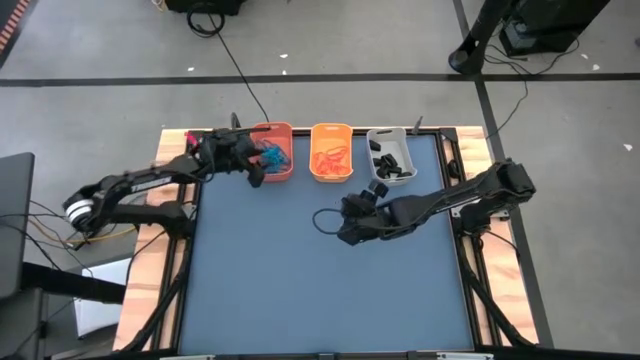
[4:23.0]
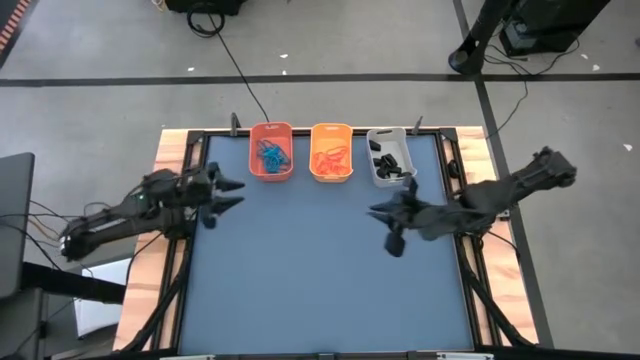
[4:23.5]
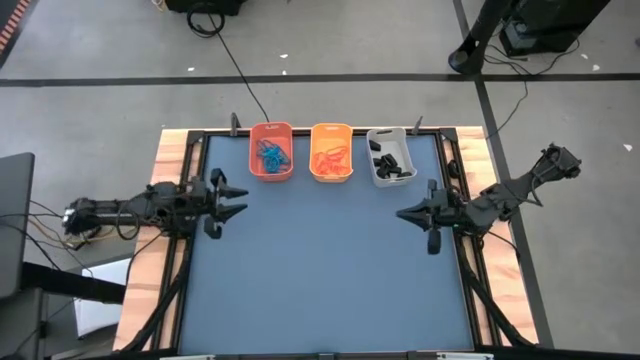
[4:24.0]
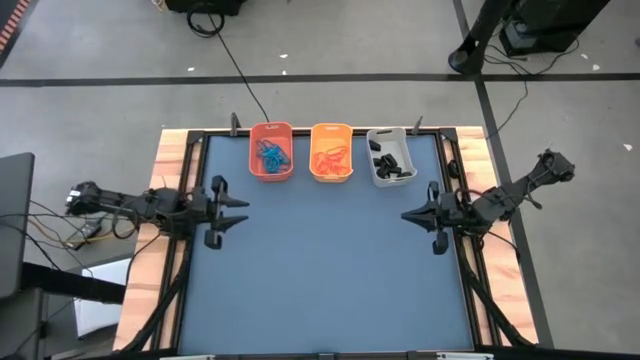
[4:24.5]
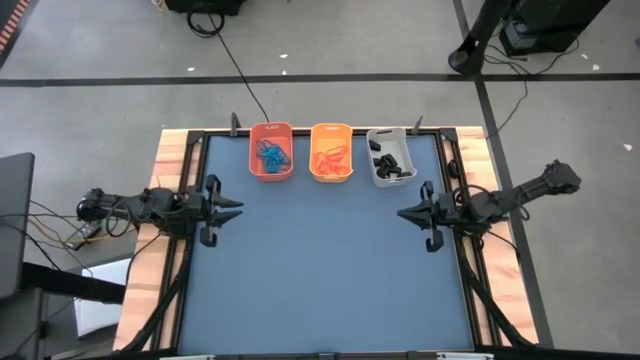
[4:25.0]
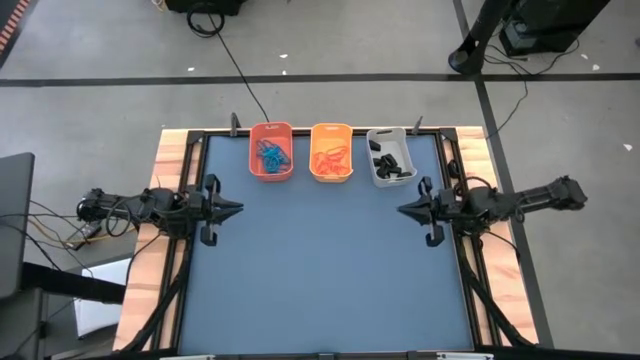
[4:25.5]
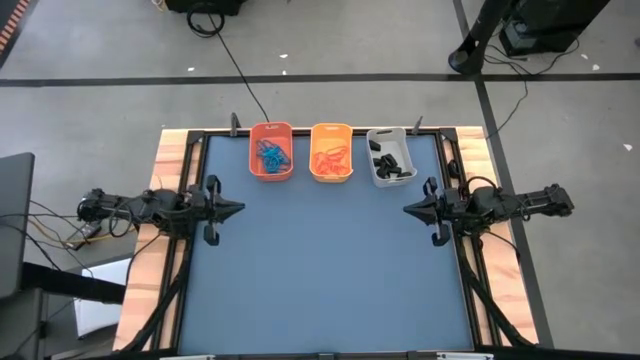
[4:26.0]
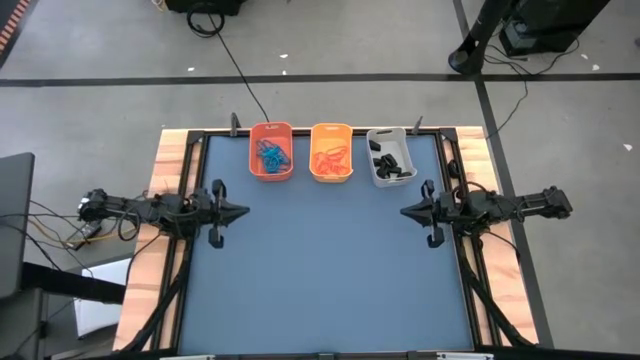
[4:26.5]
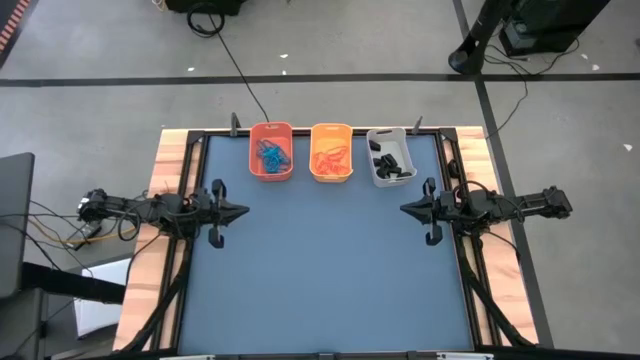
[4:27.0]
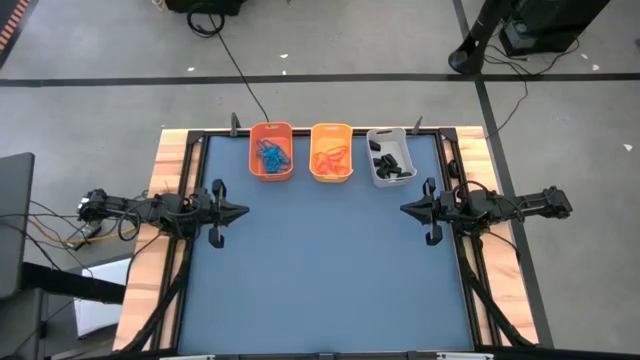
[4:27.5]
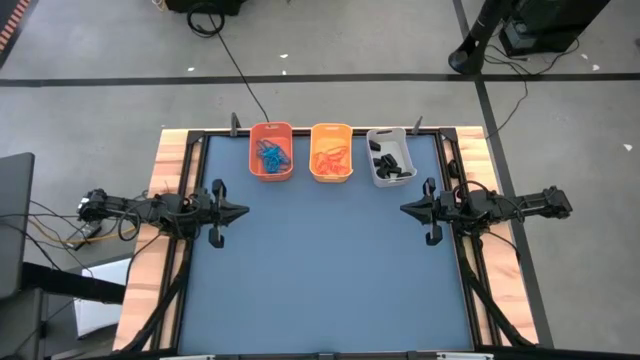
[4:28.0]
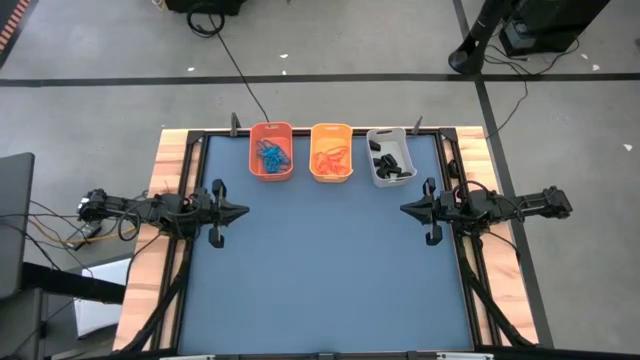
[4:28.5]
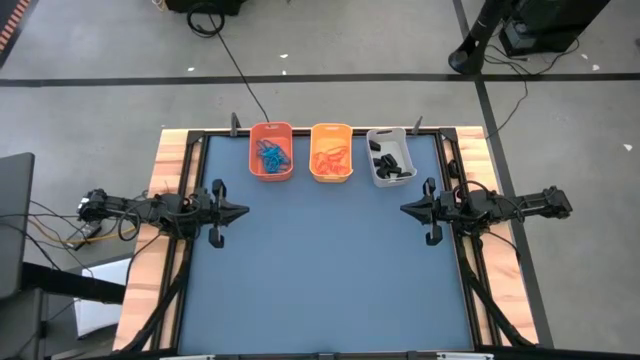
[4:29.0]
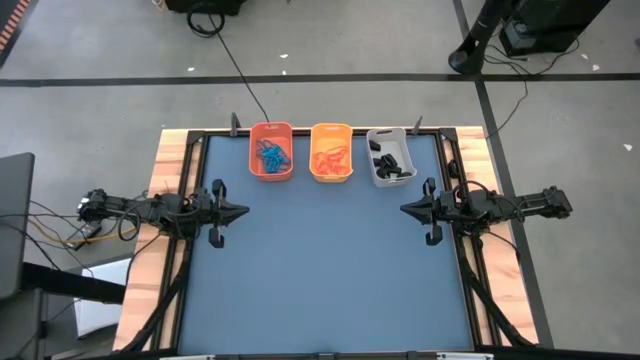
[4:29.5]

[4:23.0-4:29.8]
Task: Sort rubber bands into baskets
Return to Home Position

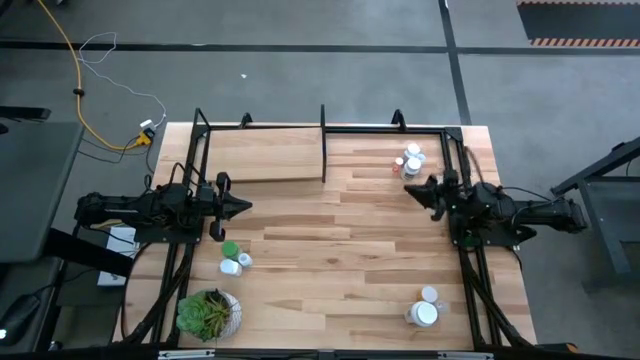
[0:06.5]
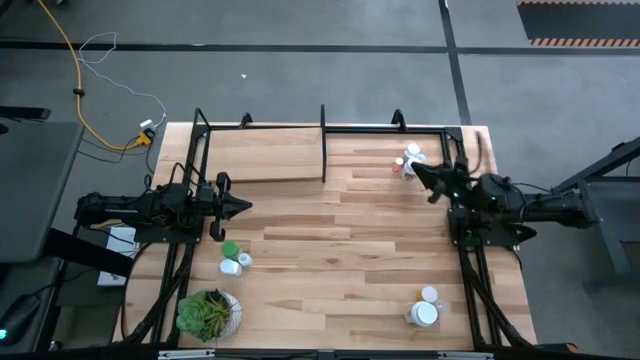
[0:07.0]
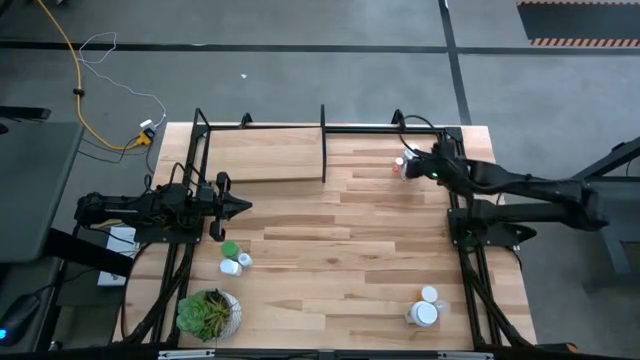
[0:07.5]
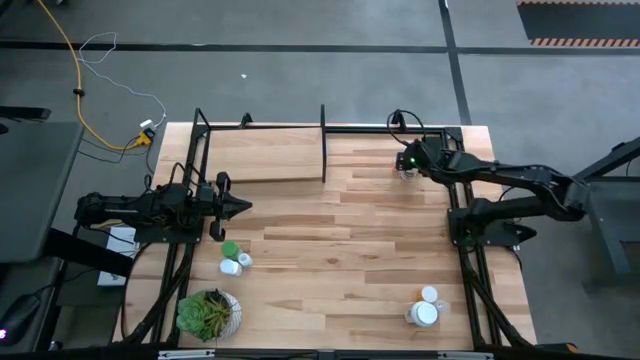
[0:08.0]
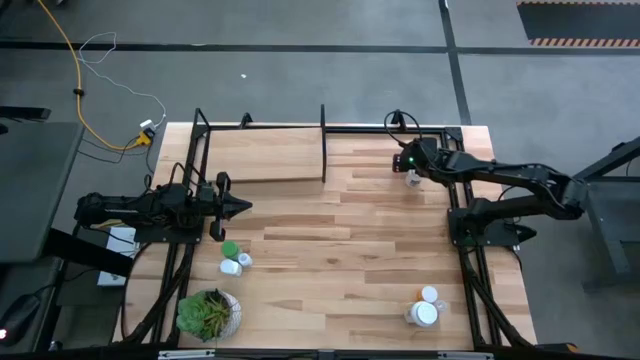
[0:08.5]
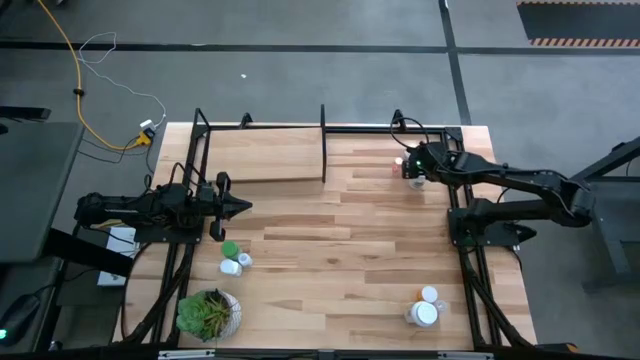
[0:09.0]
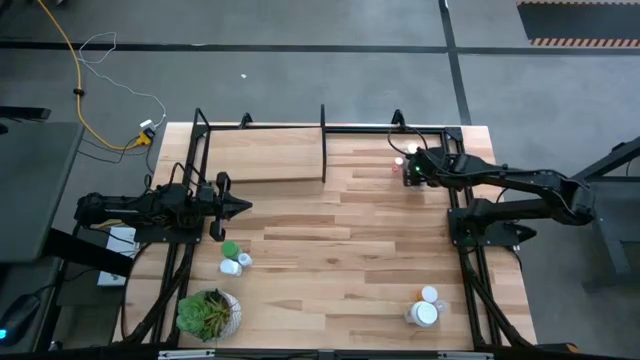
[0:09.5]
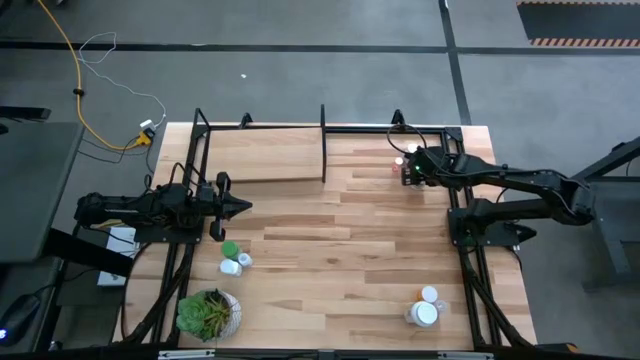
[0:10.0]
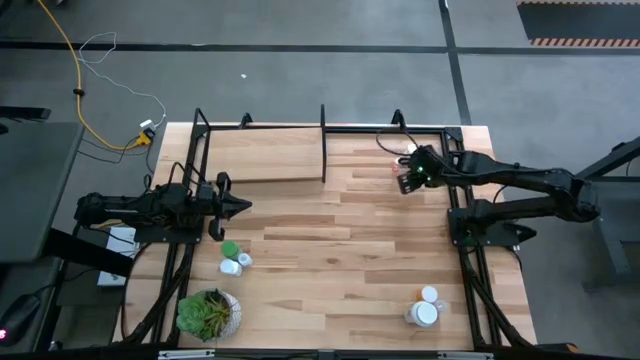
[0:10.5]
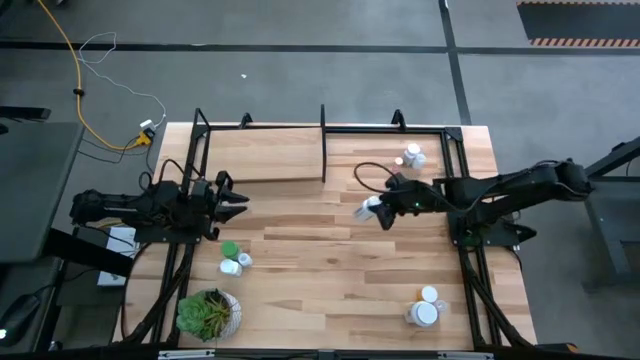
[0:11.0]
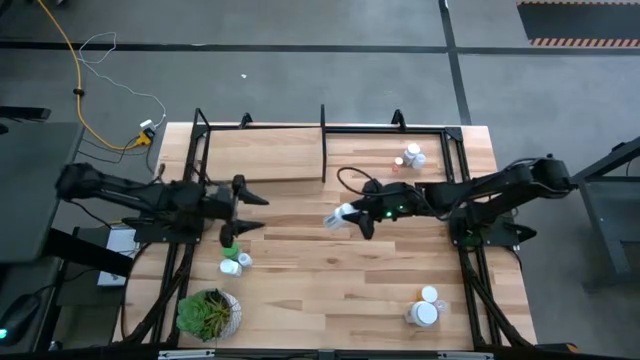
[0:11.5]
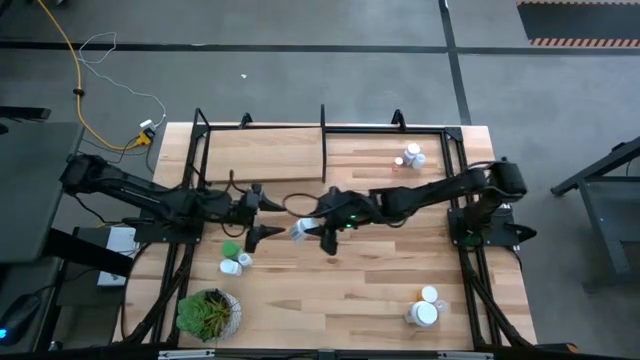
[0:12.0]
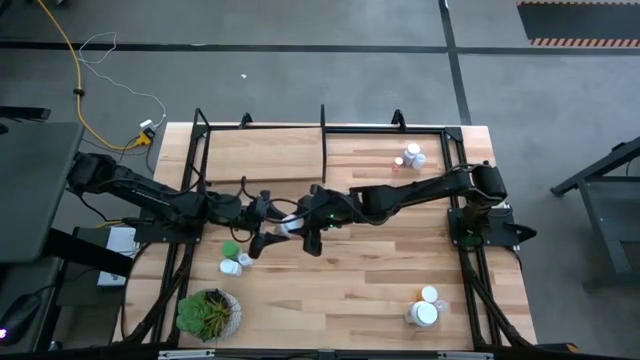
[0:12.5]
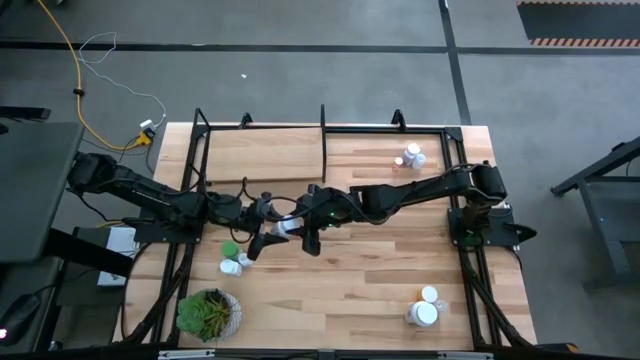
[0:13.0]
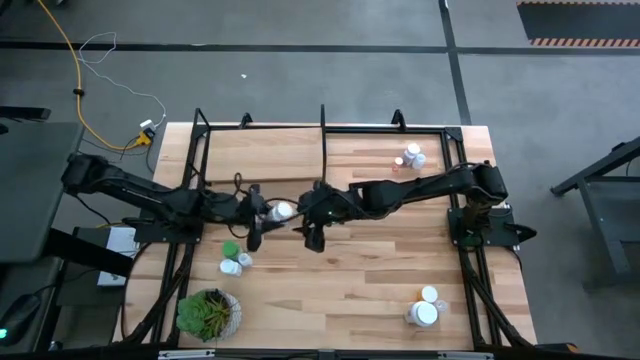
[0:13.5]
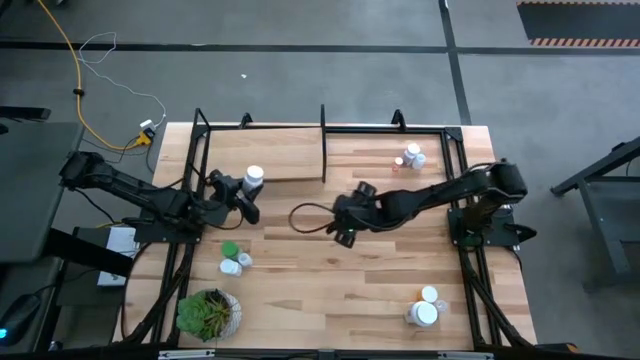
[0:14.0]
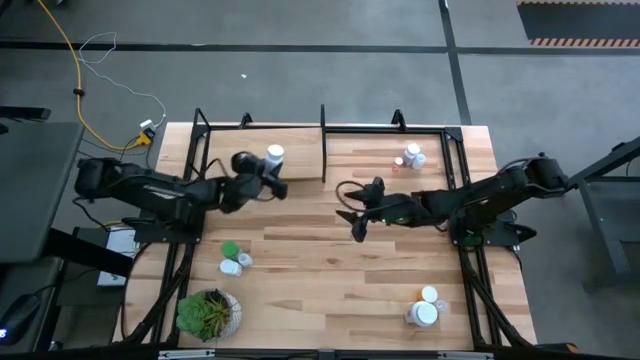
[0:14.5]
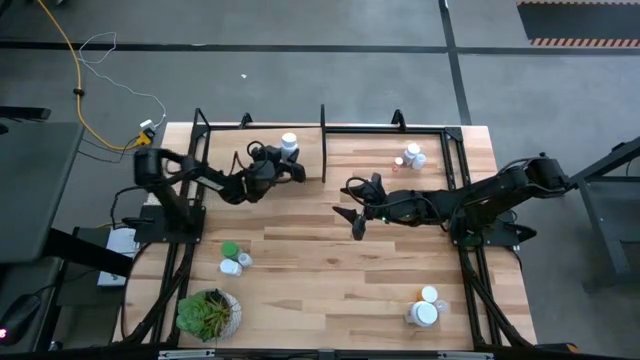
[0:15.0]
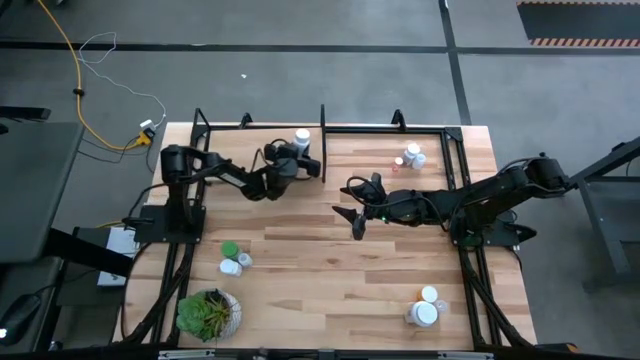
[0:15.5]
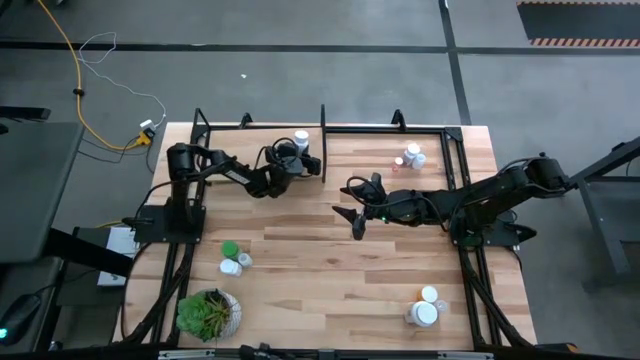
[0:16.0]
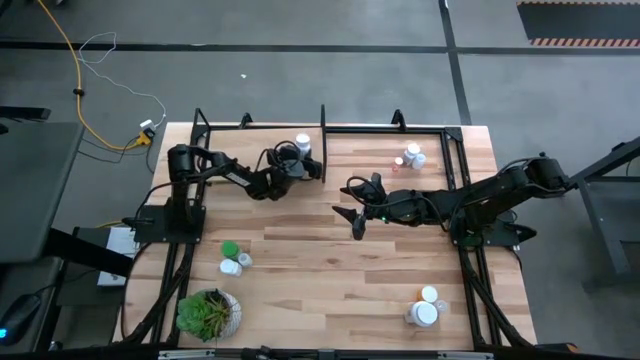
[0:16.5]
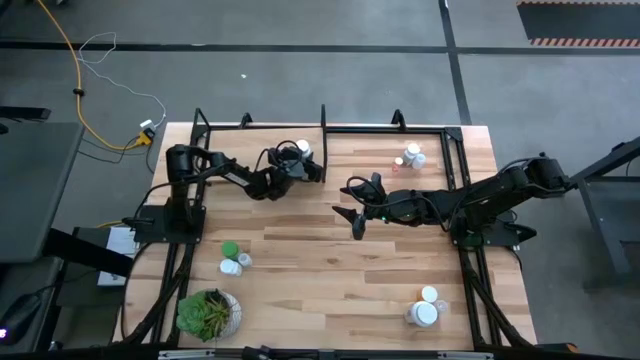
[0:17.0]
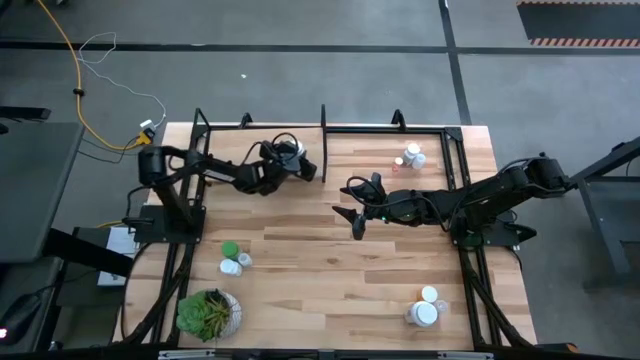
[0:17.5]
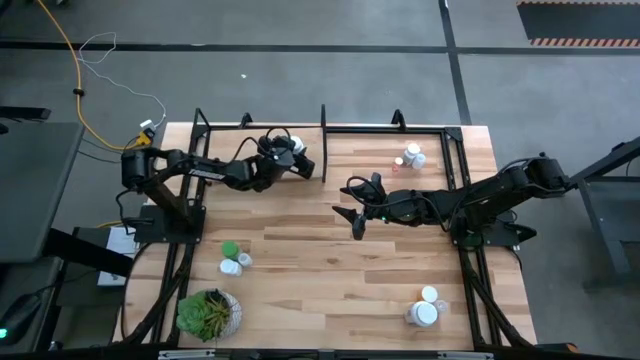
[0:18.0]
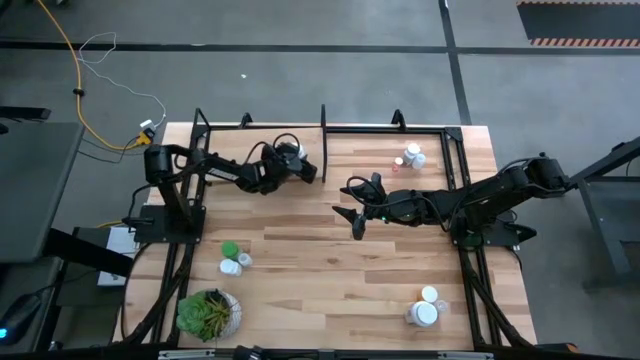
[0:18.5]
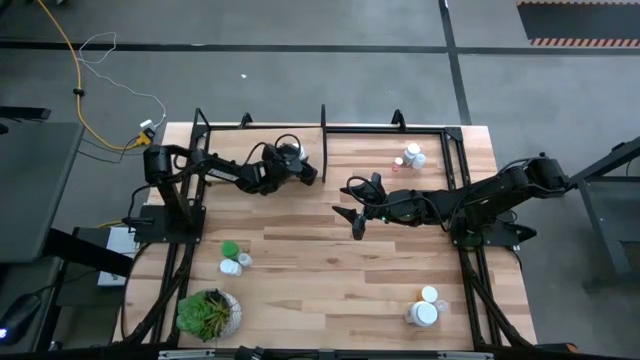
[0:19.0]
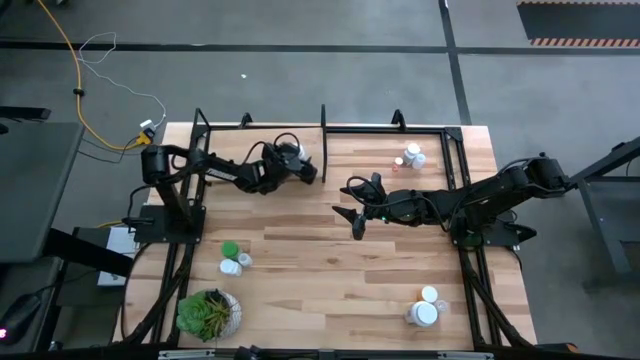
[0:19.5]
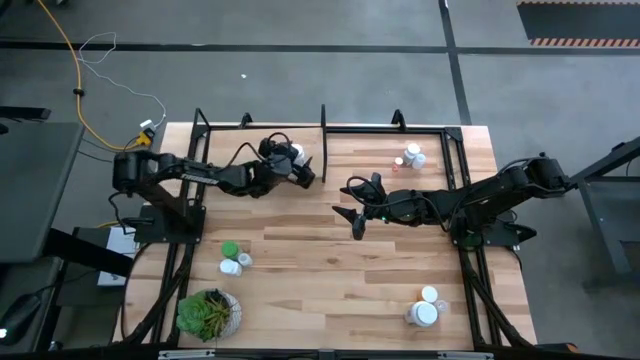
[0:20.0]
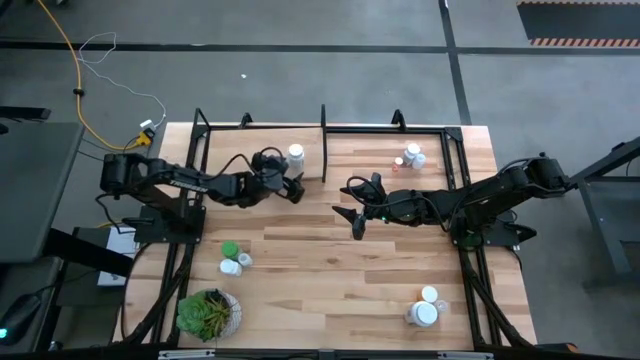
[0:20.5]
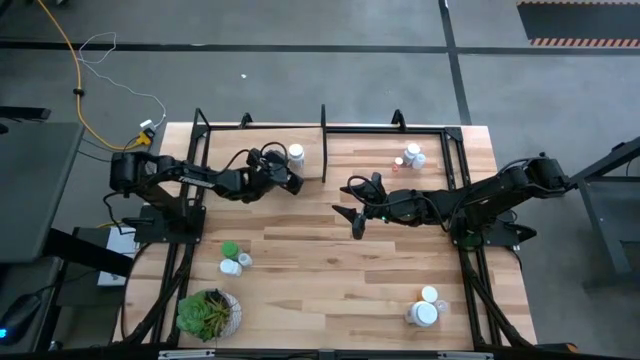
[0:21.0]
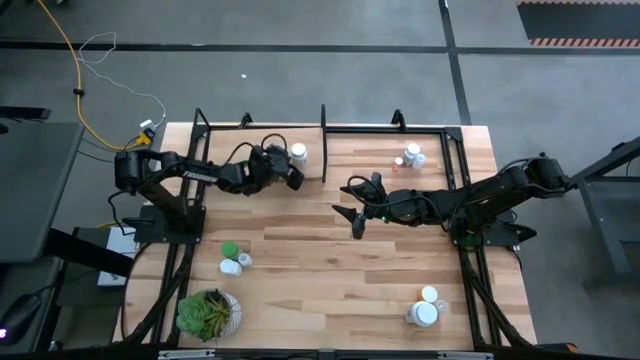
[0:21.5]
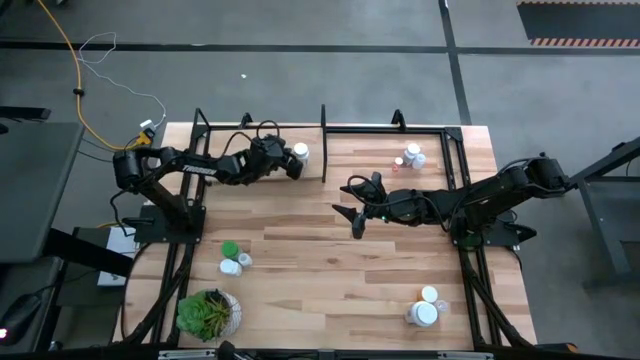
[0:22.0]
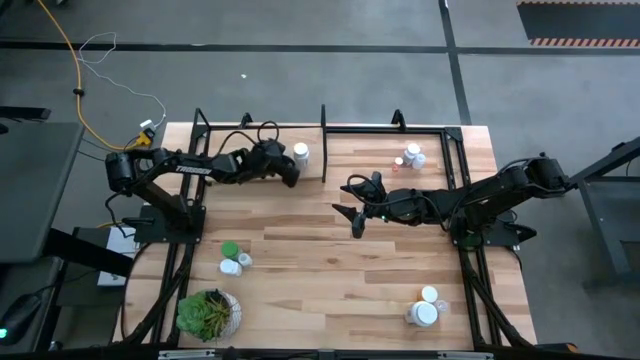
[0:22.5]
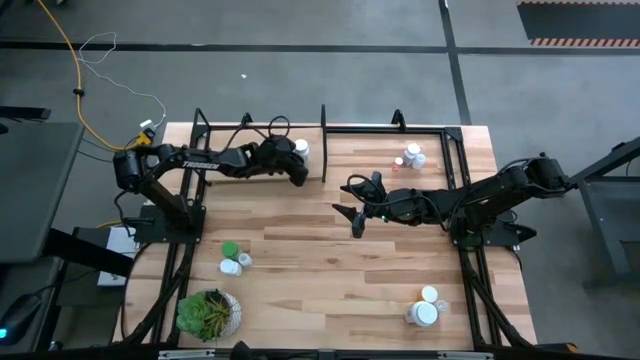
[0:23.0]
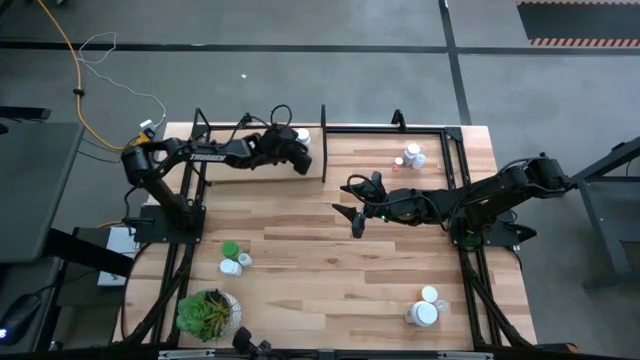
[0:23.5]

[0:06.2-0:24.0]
Task: Pick and place medicine bottles onto shelf by color
Put the top medium white pill bottle on the shelf
